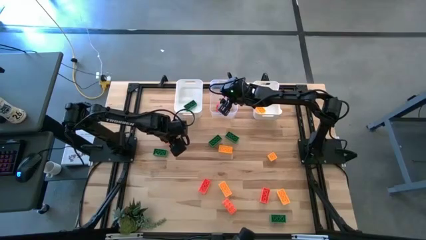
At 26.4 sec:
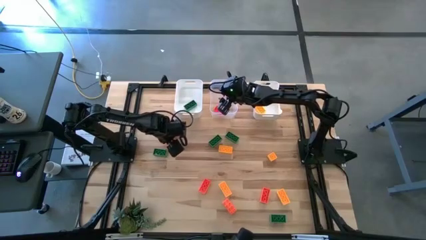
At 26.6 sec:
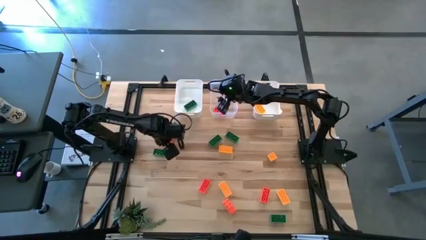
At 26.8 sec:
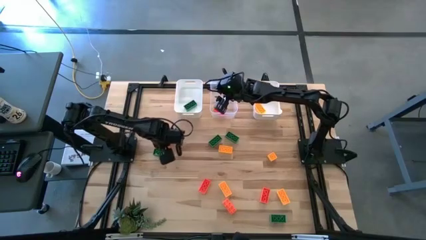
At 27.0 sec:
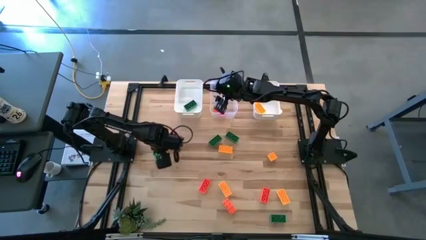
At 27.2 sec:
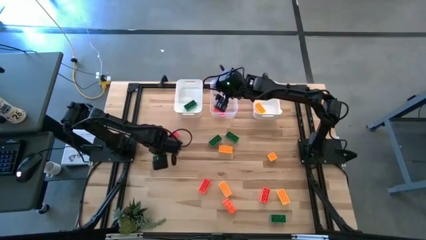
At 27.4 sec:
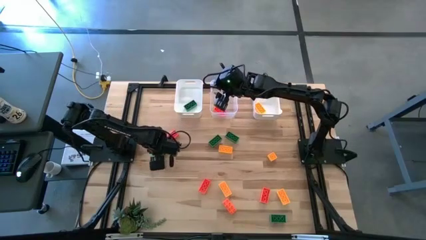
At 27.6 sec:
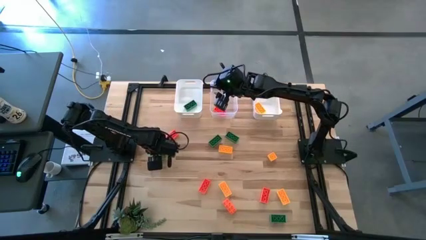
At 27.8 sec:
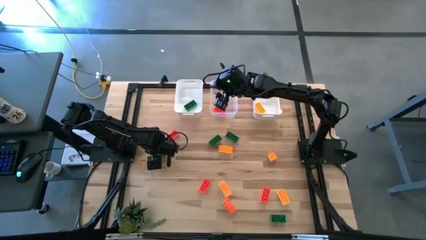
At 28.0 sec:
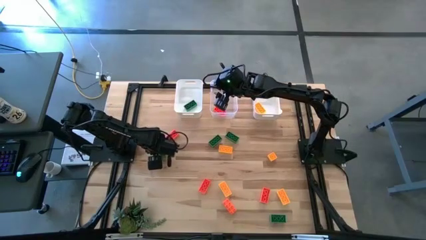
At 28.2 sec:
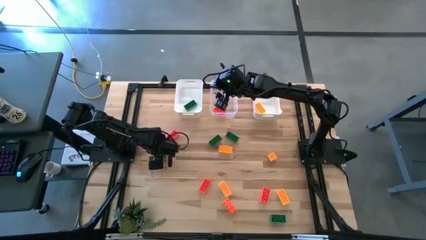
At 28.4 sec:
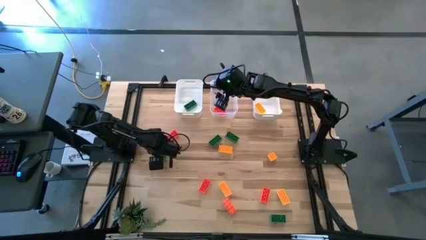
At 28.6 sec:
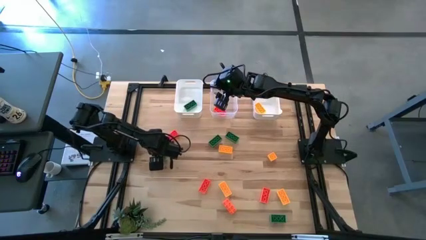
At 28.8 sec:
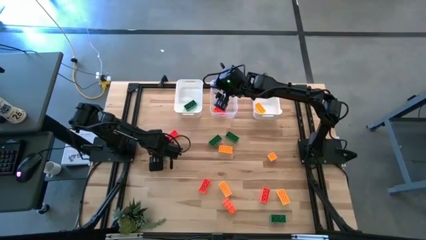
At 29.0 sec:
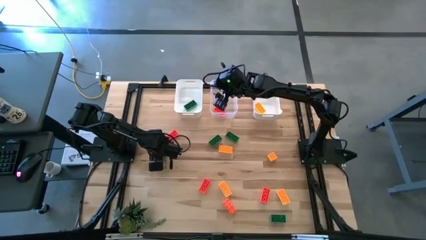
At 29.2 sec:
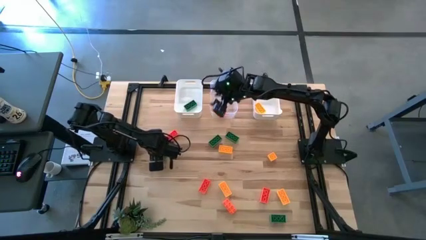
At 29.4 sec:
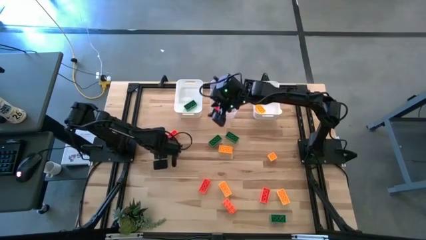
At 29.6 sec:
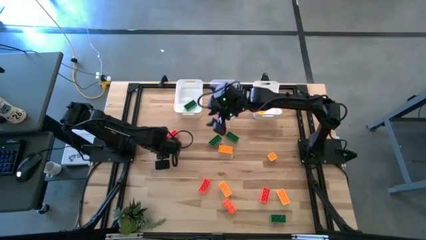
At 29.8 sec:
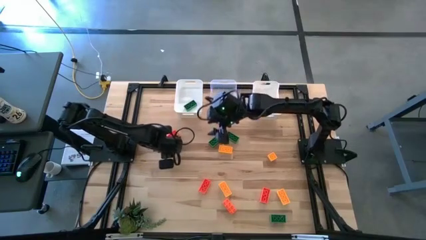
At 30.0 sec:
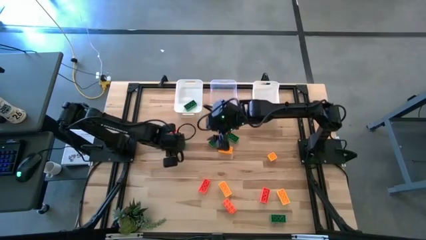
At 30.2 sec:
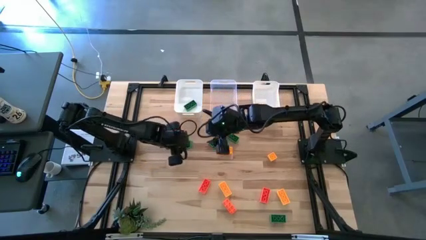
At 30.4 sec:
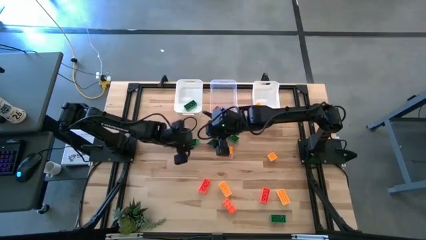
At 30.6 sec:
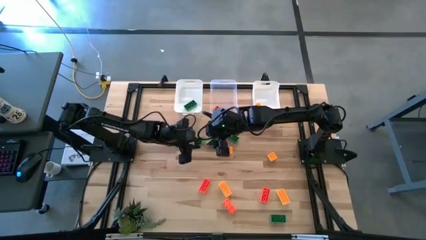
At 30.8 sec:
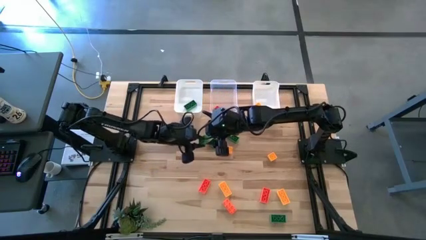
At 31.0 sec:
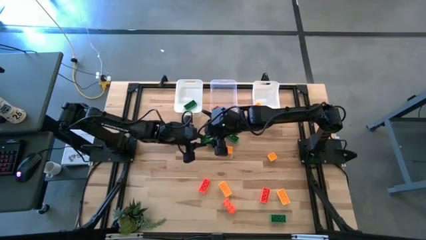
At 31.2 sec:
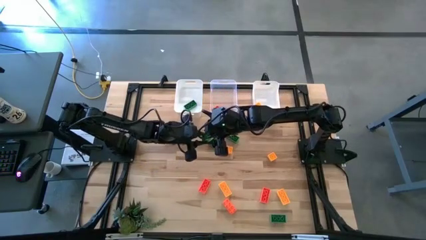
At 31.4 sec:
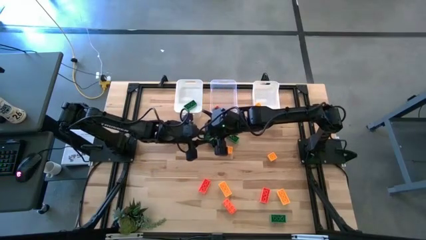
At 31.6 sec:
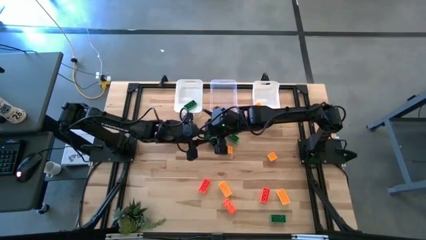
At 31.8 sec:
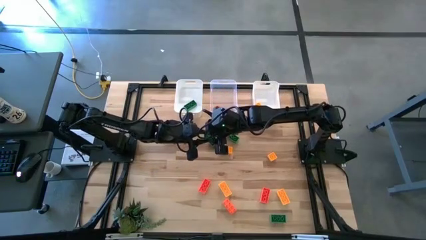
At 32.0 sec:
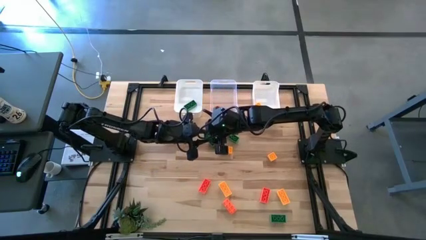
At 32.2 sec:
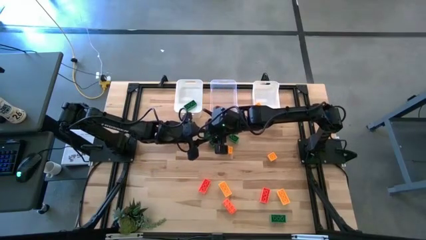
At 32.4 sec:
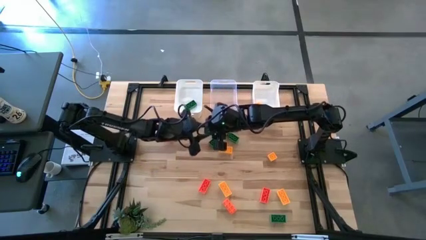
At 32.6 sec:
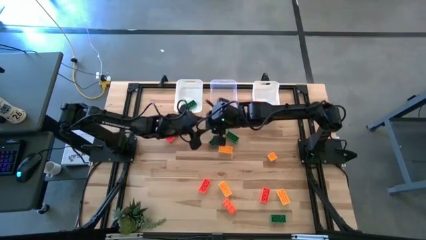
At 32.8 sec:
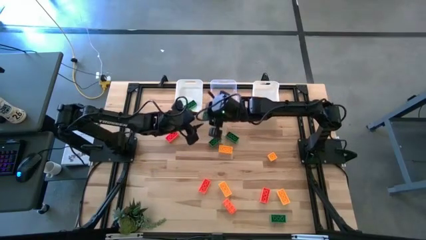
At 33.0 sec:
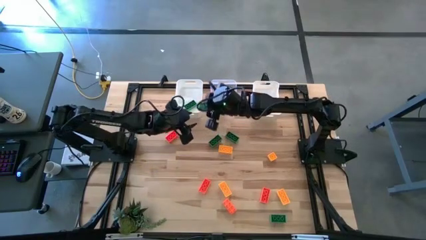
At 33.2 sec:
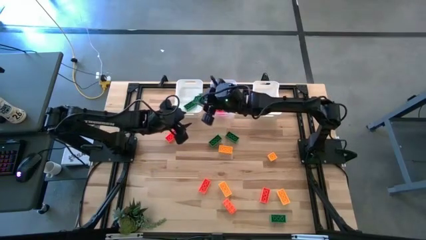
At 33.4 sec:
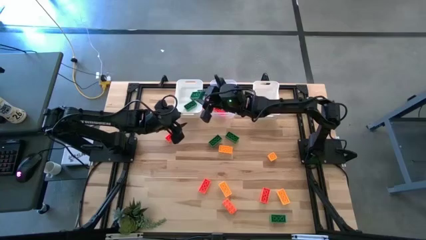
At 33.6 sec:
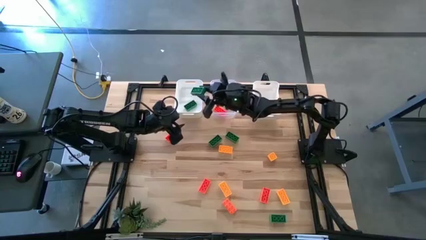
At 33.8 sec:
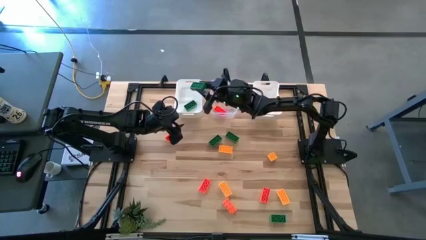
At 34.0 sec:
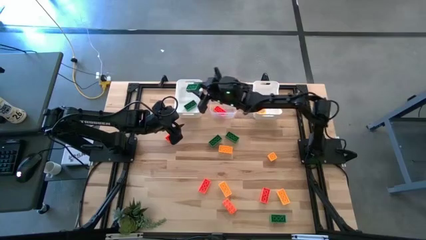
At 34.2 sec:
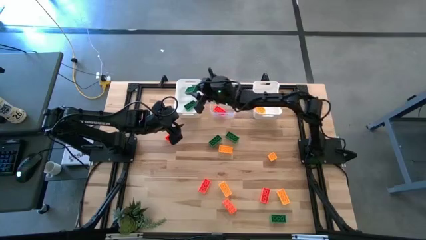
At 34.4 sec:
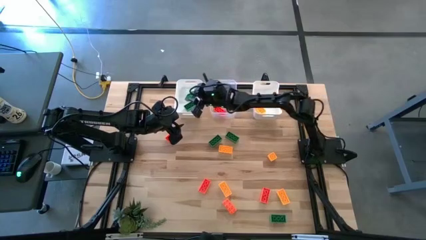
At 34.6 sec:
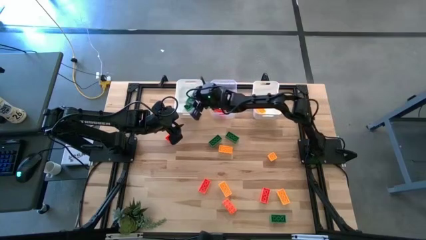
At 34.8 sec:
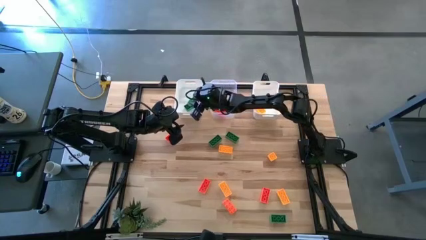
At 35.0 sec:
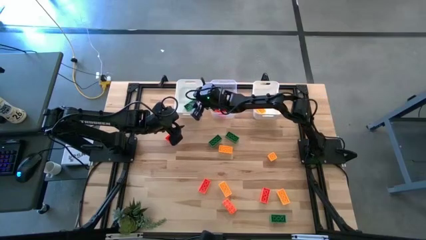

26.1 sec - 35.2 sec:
Task: Sort & place blocks by color
Put the green game piece into the left white bin

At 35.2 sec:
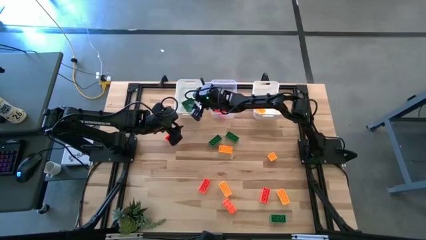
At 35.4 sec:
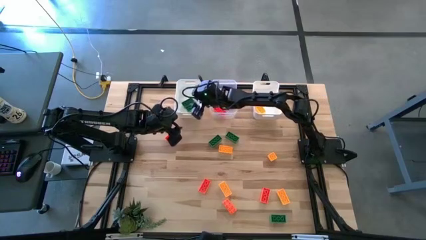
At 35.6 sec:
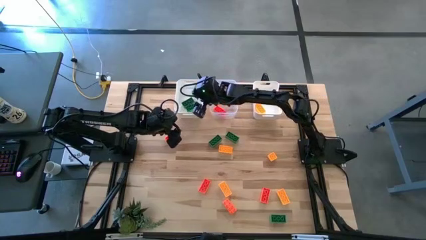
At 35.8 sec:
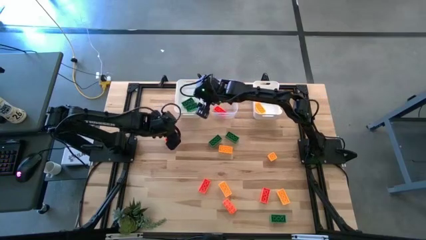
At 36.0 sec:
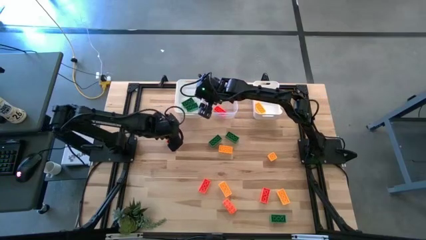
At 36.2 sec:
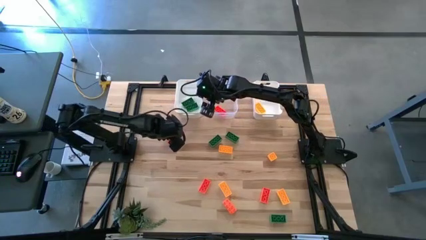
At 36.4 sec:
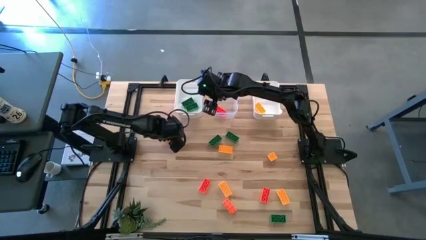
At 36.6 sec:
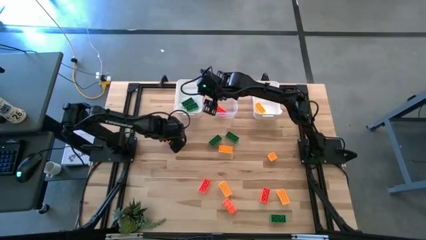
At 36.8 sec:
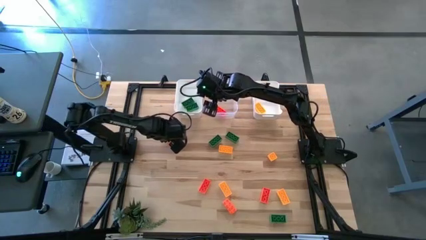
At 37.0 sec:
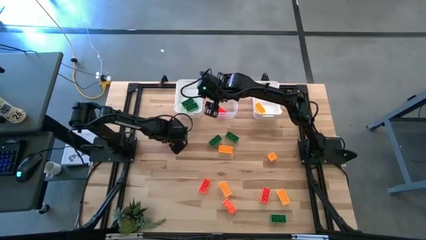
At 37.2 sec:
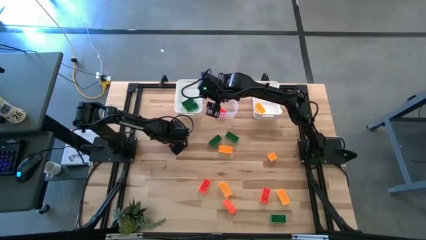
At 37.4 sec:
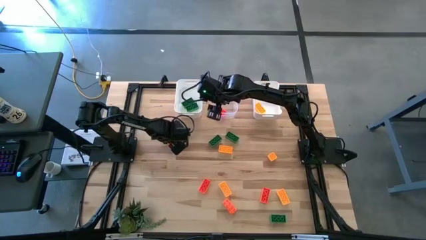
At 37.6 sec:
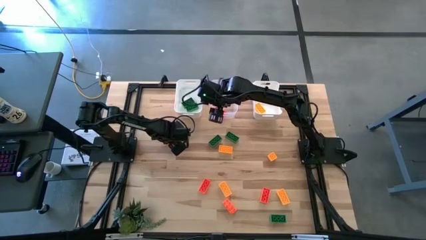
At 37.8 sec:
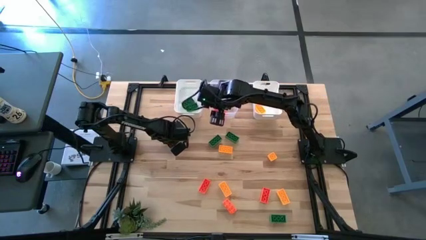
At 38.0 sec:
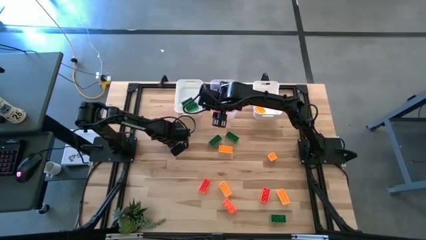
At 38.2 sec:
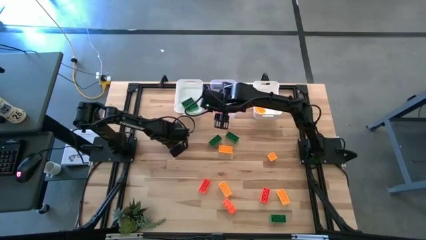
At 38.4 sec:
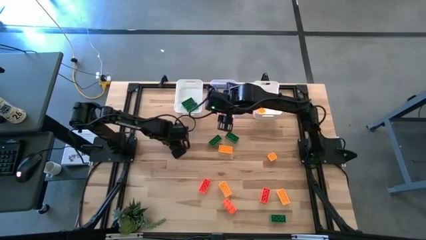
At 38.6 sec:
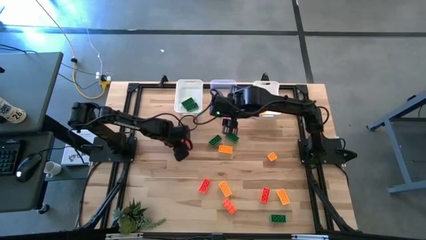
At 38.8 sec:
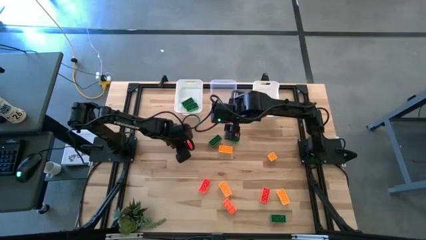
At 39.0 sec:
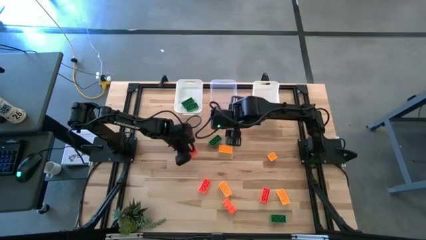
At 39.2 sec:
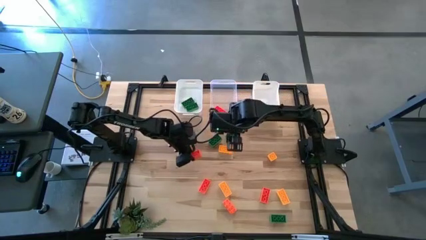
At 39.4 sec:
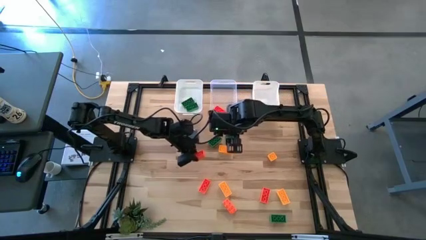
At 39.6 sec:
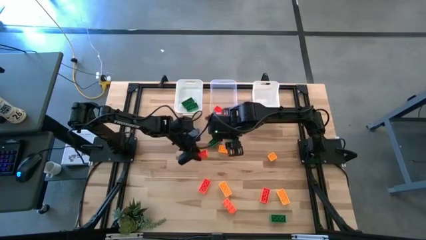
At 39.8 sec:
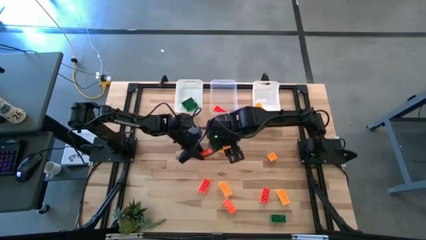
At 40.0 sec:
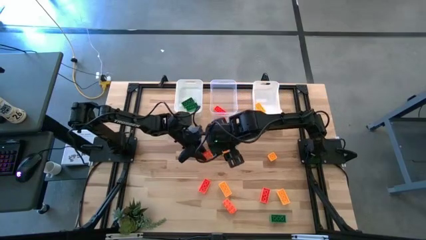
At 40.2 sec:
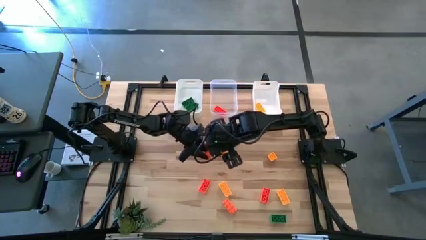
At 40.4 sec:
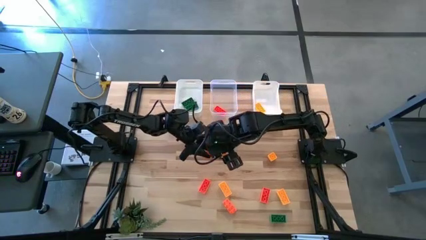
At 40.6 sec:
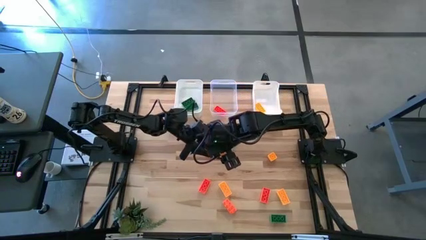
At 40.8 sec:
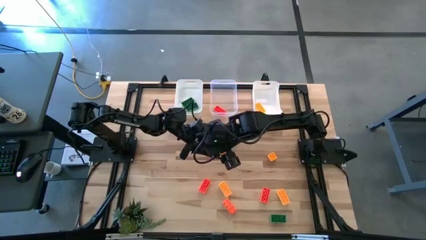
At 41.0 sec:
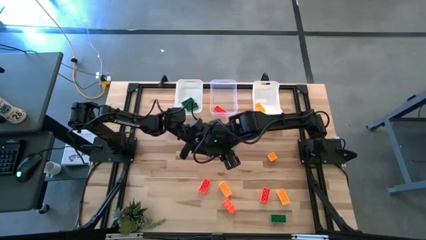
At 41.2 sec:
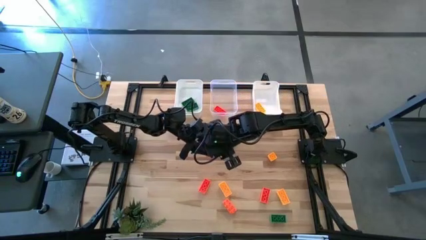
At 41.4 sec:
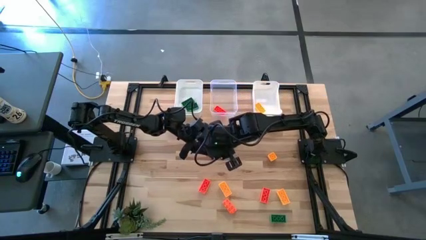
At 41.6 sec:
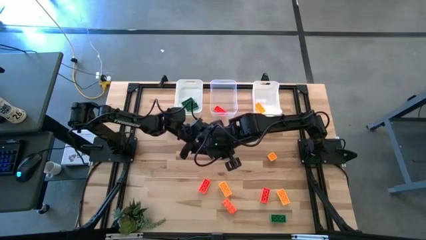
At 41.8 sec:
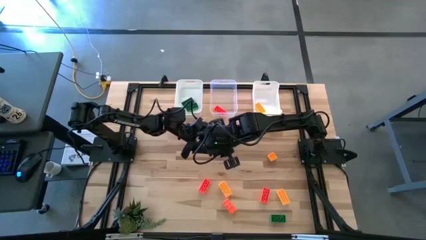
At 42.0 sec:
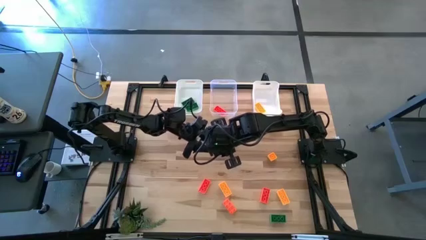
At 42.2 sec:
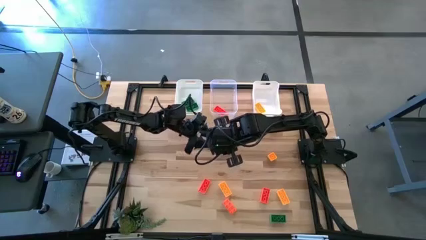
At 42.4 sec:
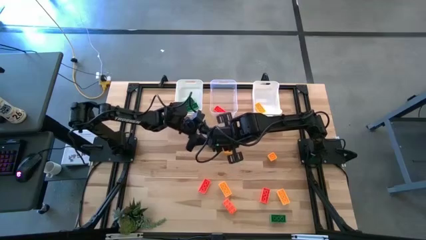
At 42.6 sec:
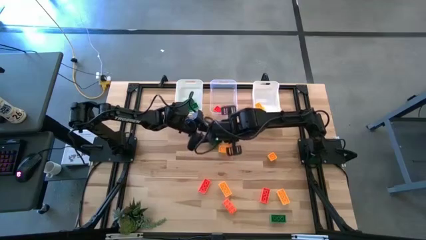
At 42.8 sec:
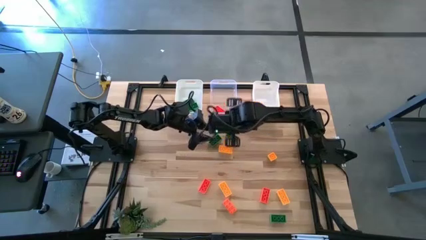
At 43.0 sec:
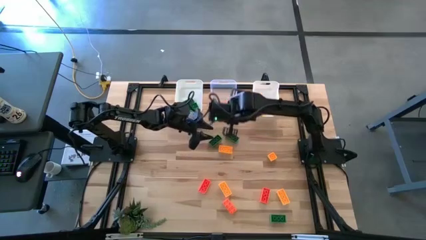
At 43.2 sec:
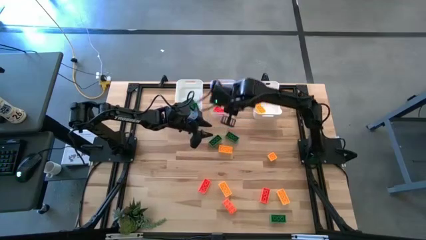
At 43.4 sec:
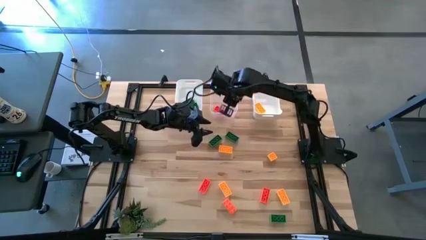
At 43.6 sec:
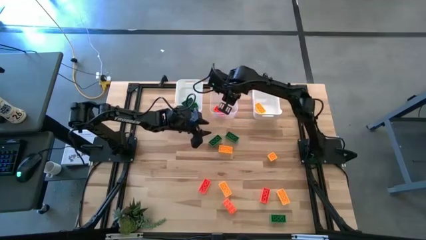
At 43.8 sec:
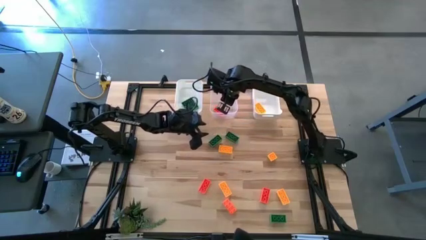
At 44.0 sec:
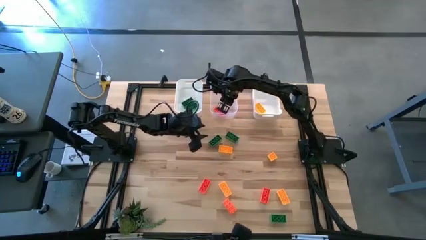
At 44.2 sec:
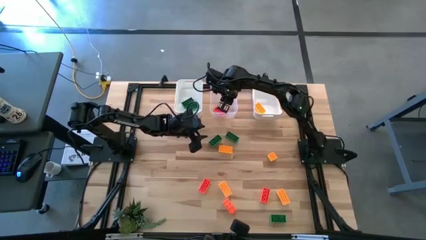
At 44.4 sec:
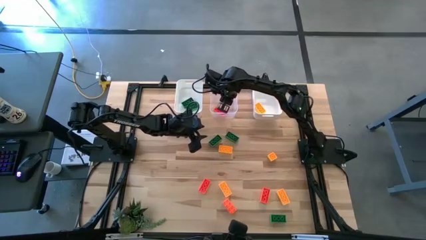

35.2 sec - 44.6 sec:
Put the orange game piece into the transparent bin
